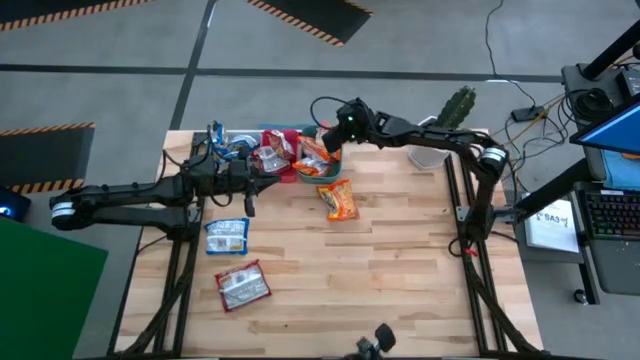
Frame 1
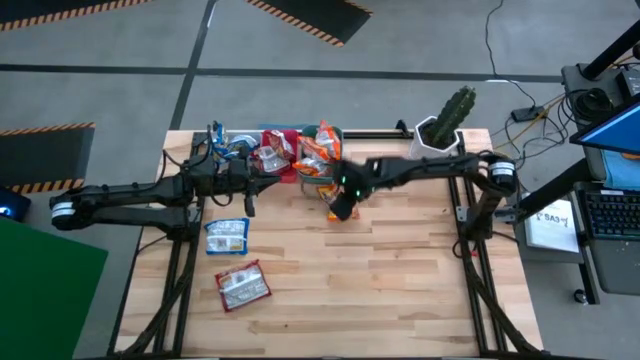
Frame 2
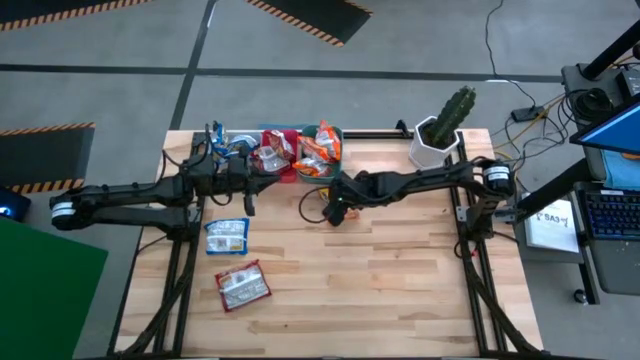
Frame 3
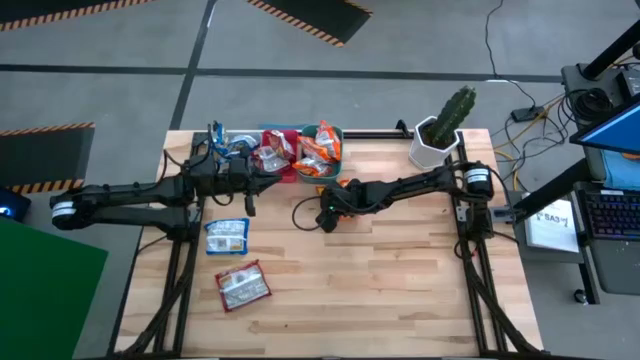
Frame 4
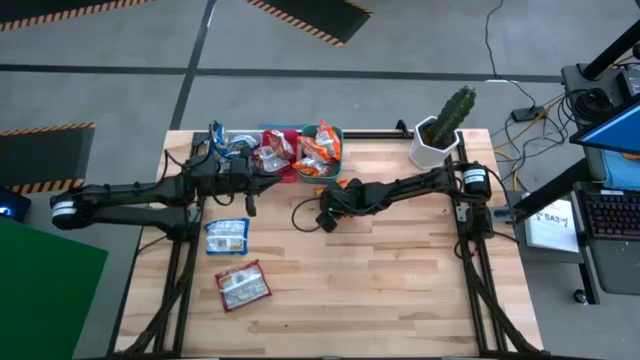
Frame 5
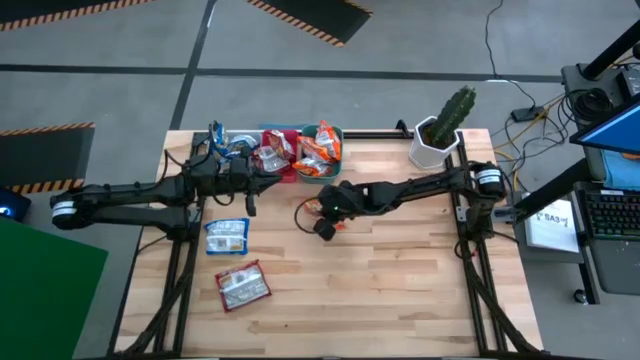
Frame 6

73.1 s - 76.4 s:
Task: Sort Maruchan noodles
Put the orange noodle pack into the green bin

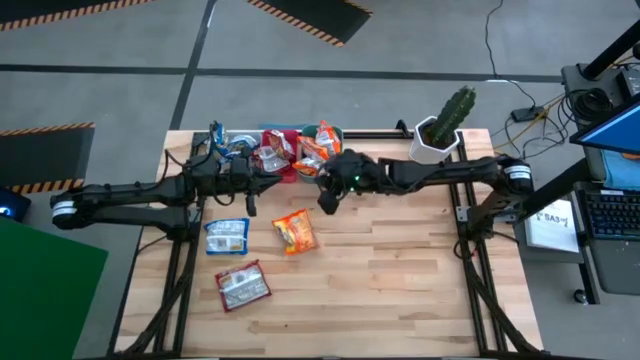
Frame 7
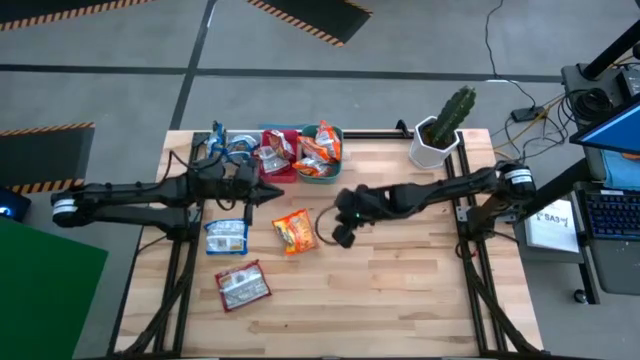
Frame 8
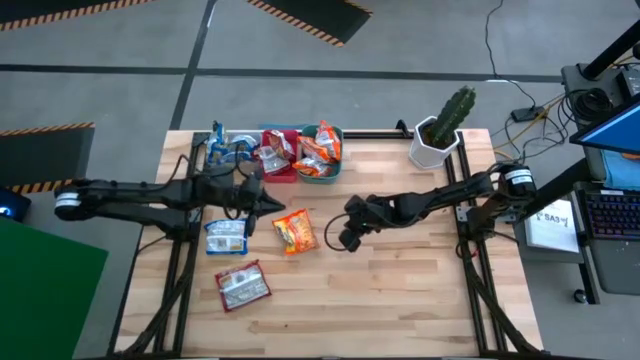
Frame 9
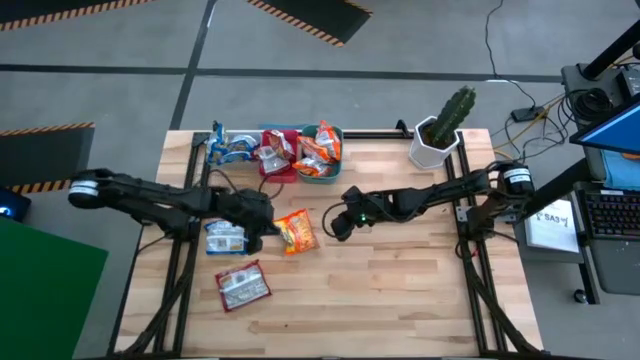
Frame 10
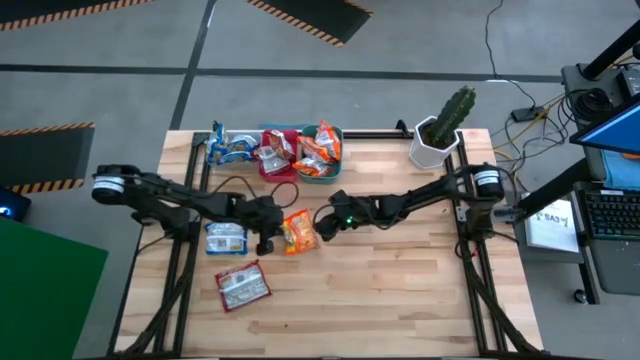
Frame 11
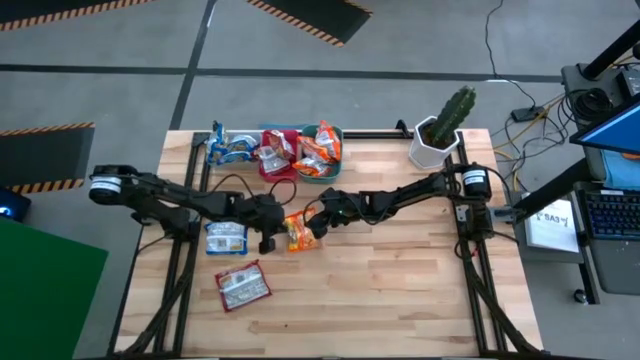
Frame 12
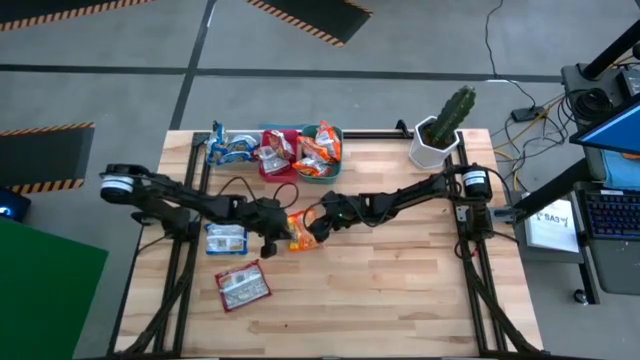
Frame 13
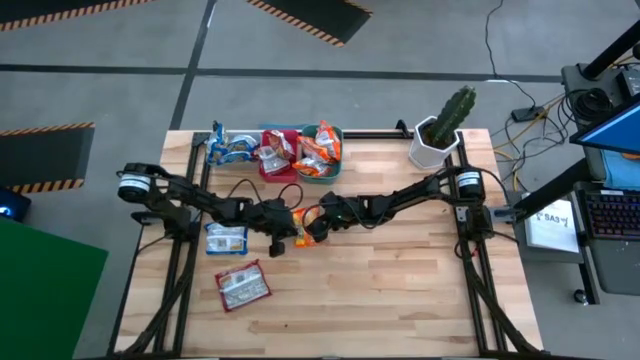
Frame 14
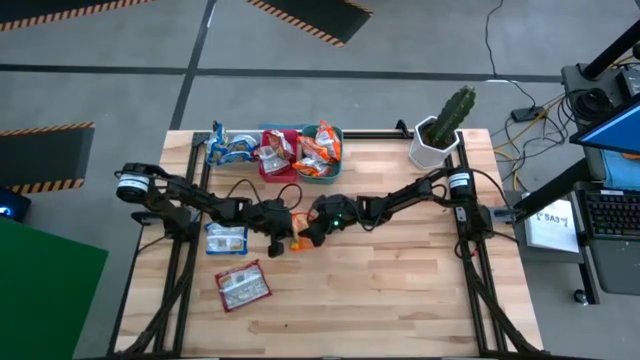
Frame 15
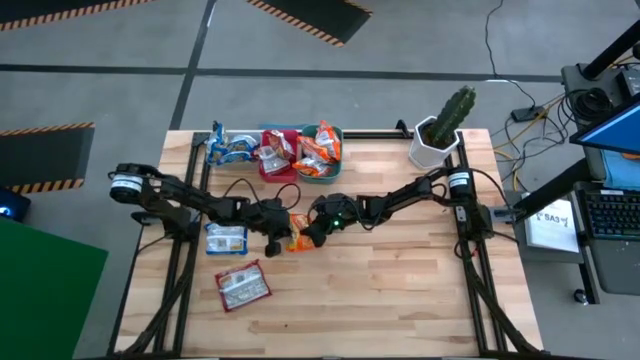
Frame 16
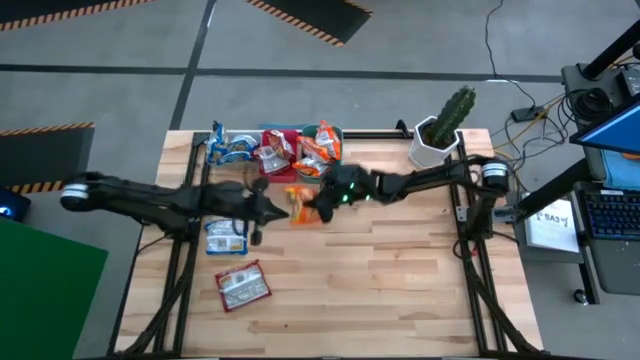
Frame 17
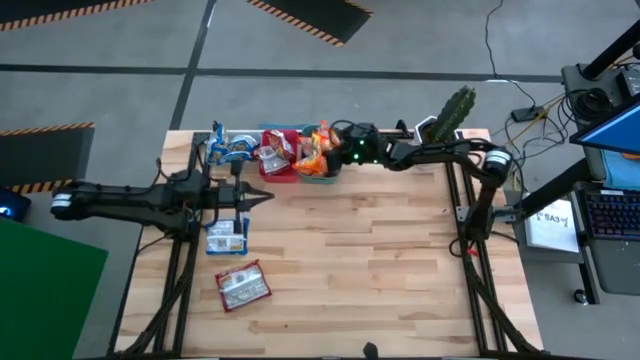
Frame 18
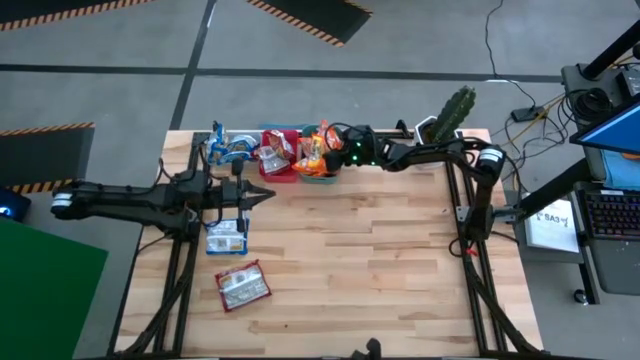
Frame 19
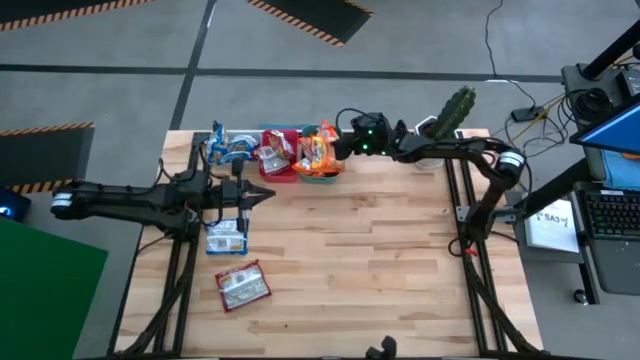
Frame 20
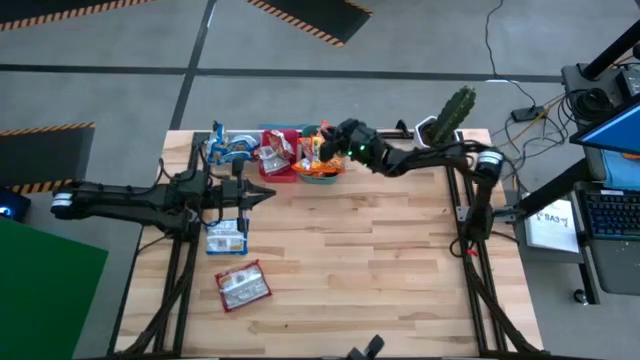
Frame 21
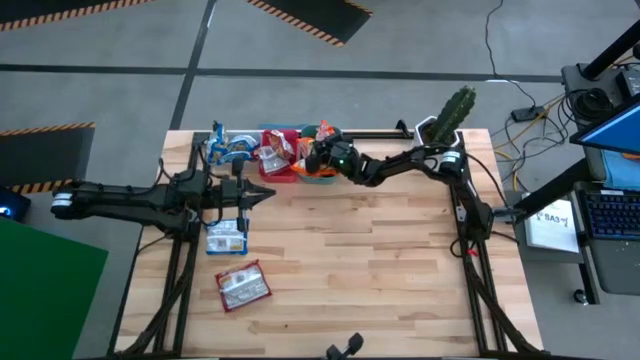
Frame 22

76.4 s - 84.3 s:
Put the orange noodle pack into the green bin

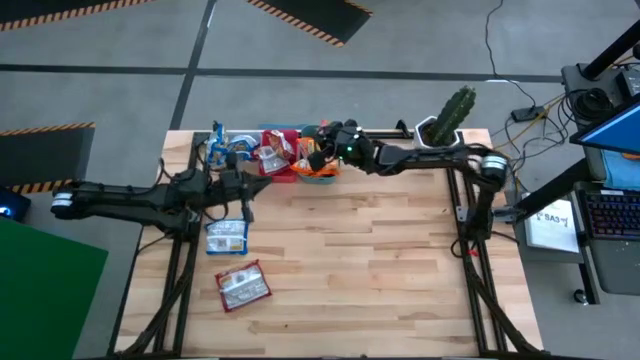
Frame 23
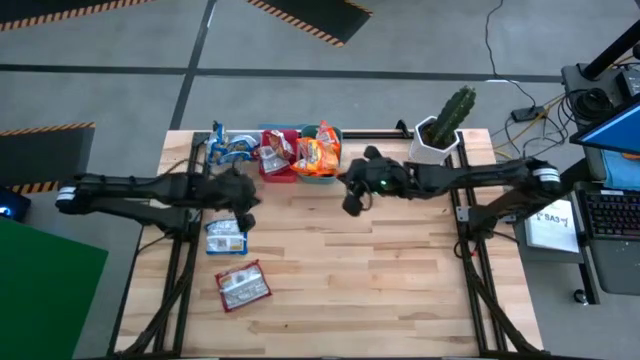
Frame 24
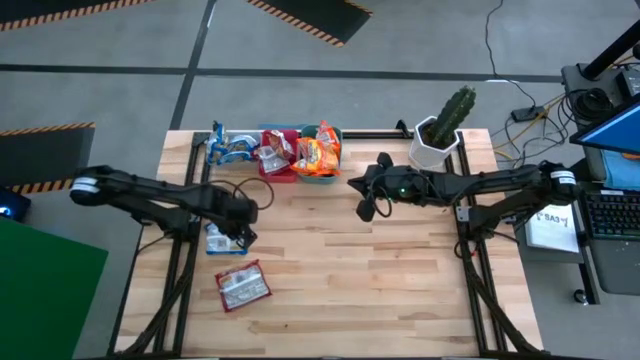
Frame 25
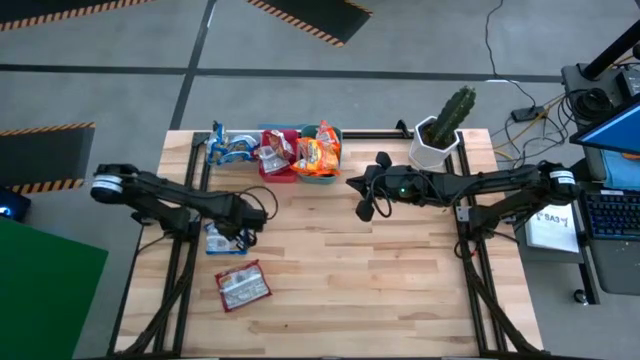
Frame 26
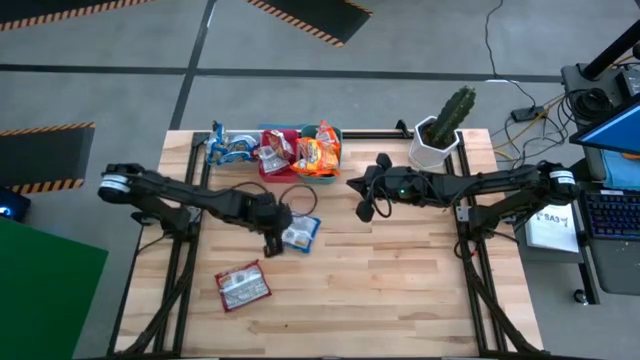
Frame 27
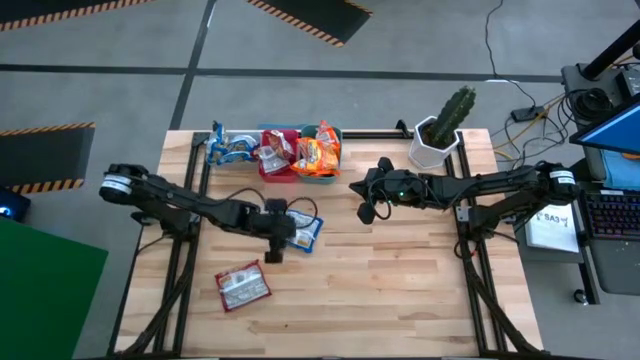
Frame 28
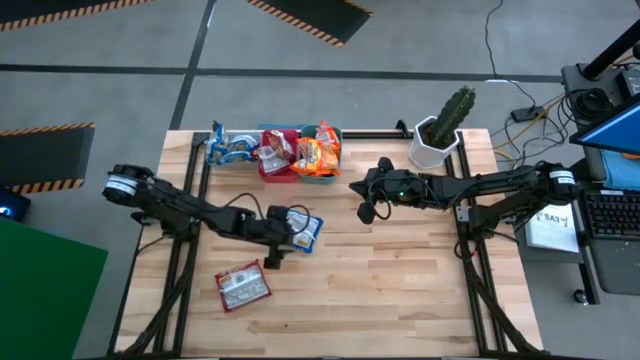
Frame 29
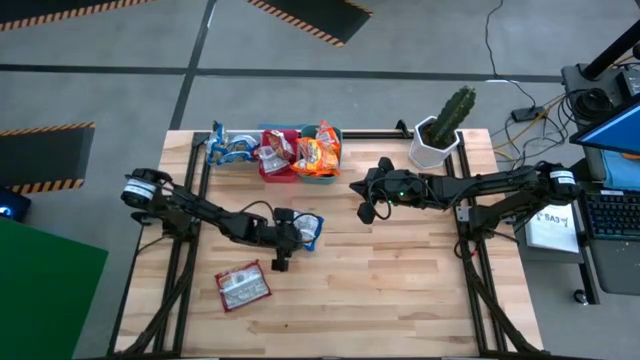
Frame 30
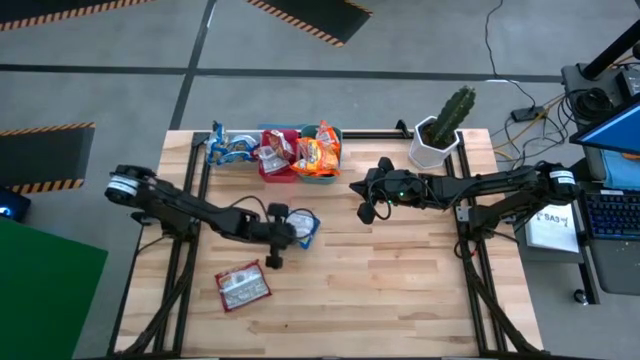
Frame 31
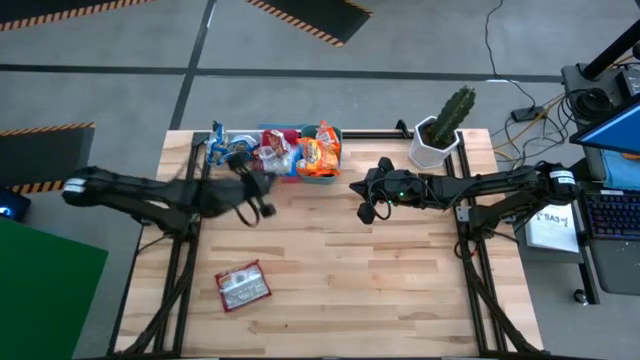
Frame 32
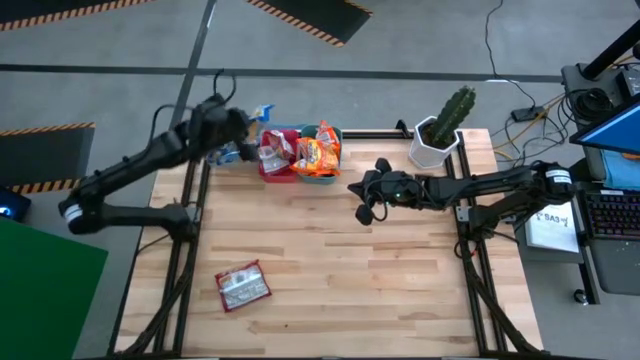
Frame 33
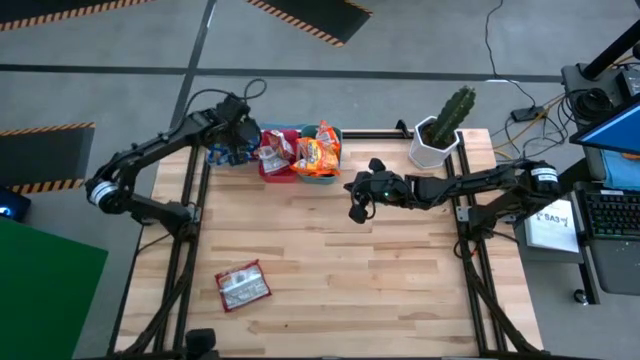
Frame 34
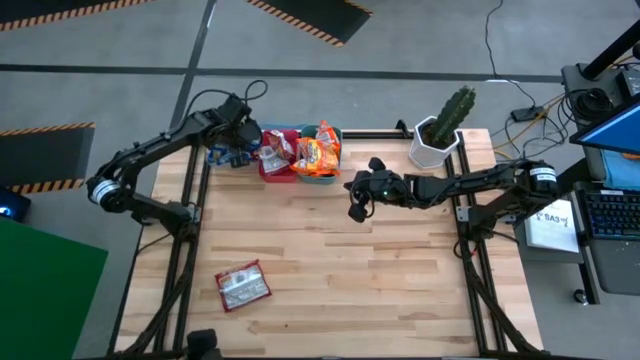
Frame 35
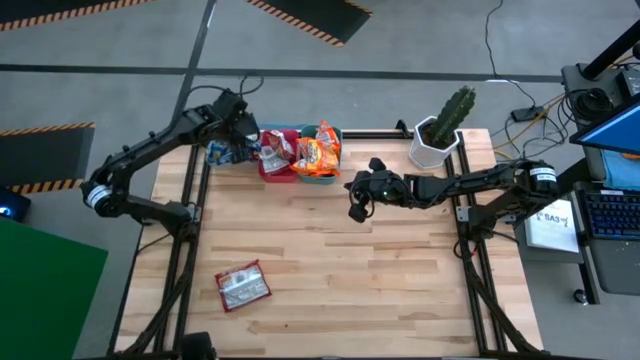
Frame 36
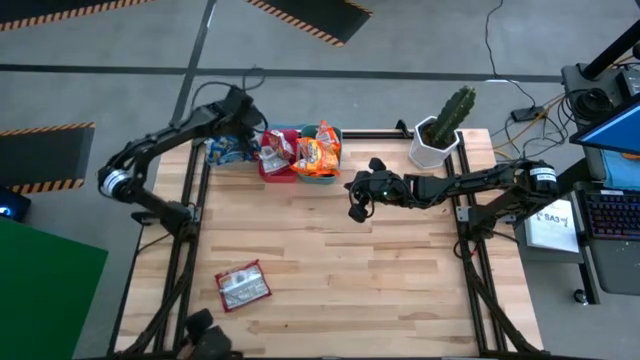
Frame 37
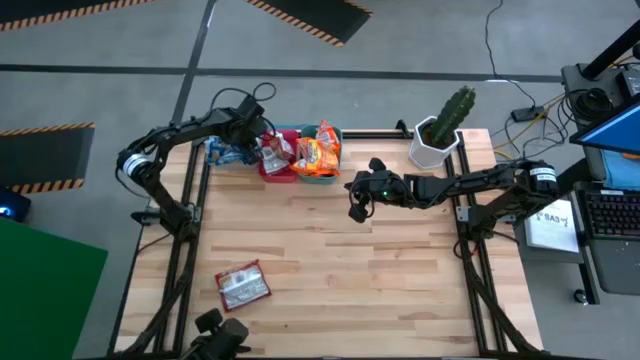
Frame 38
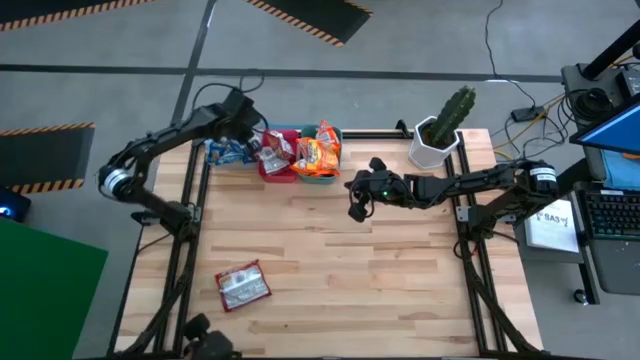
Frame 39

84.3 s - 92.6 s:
Put the blue noodle pack into the transparent bin

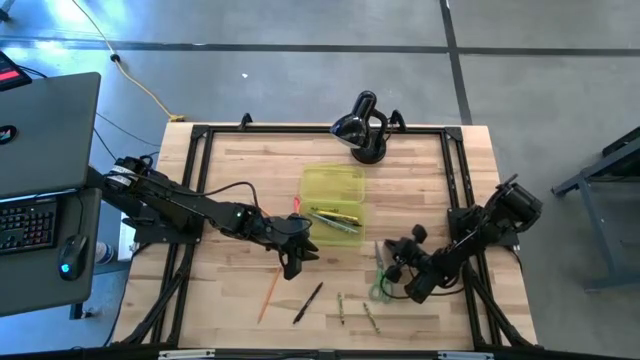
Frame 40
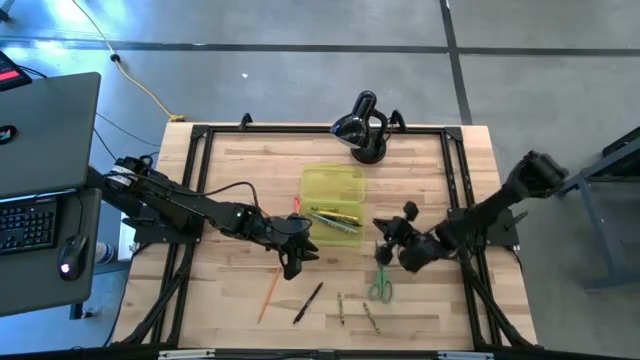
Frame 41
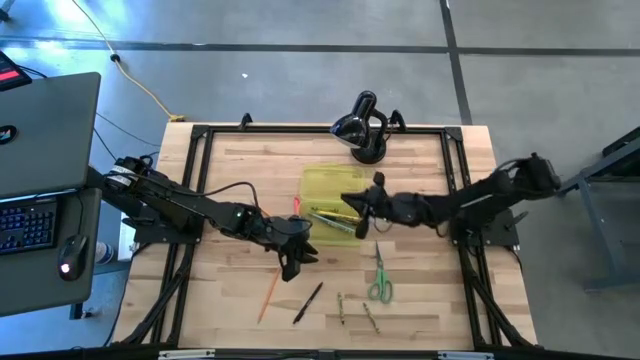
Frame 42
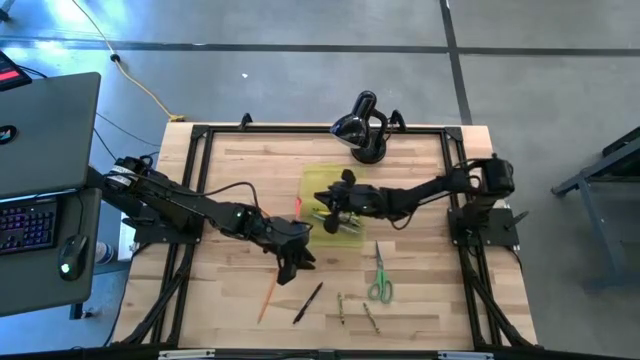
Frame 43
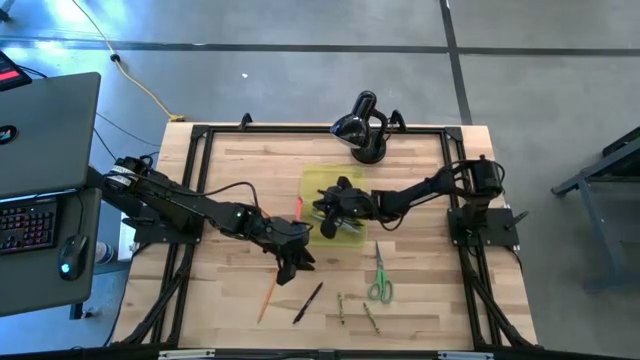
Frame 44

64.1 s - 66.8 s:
Task: Pick & place school supplies into a supply box
Put the blue pencil into the yellow school supply box
